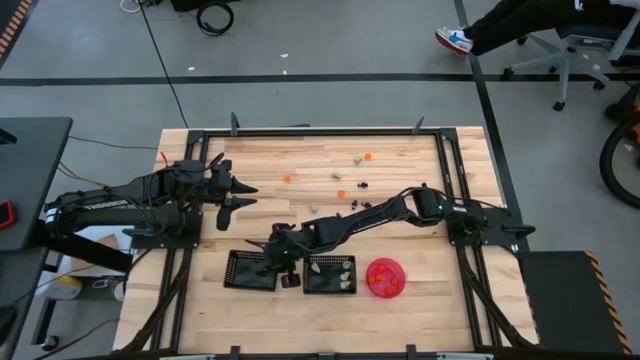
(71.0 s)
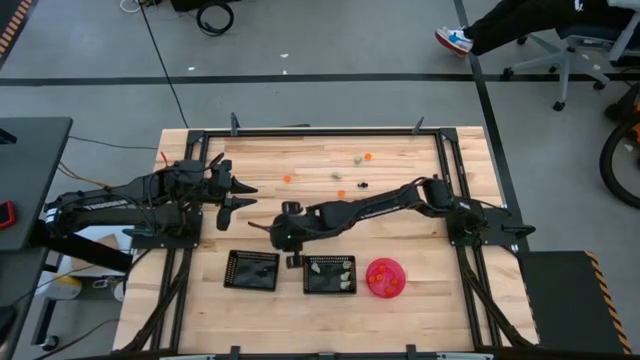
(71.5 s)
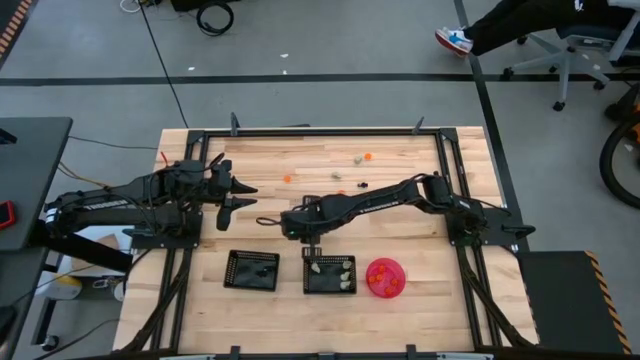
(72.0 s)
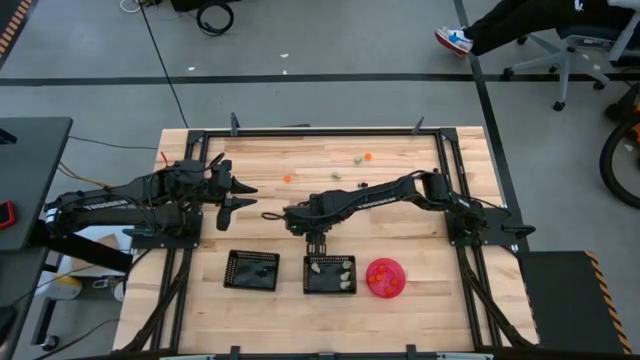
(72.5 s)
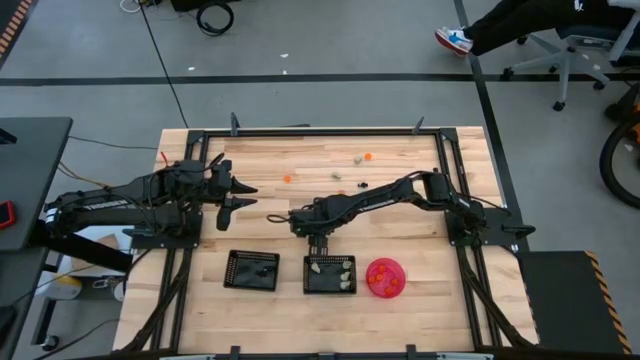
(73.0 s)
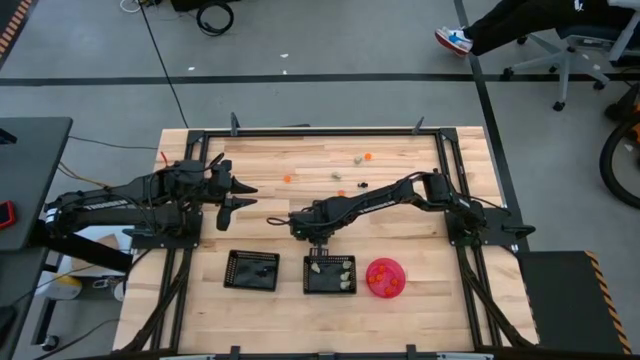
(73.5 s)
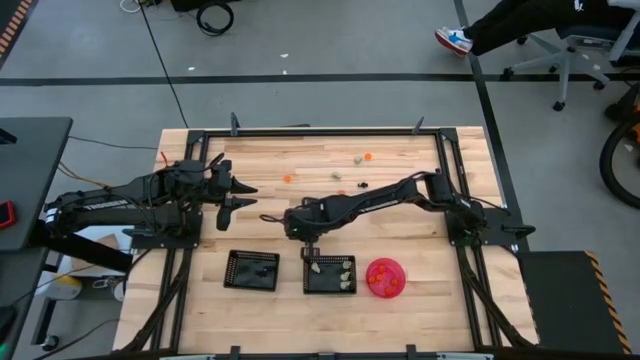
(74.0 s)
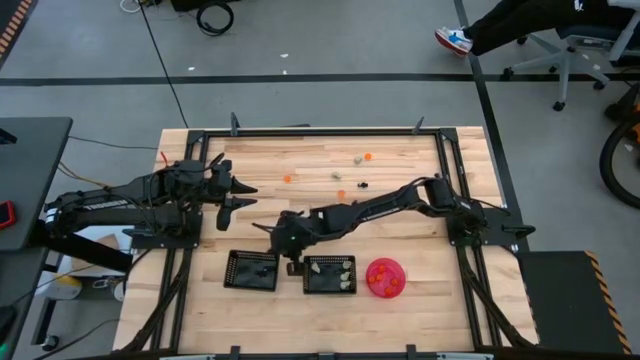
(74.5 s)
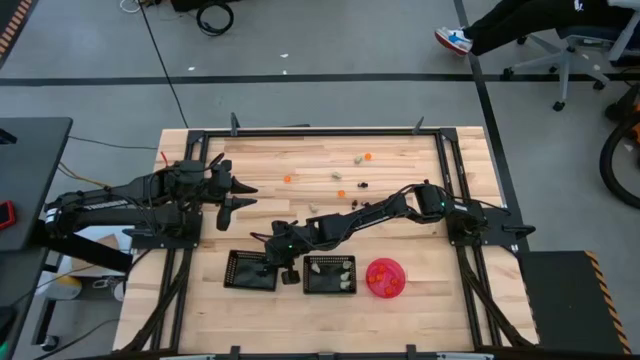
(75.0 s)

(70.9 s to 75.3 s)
Task: Sort Halloween decoration
Put the black skeleton toy into the left black bin

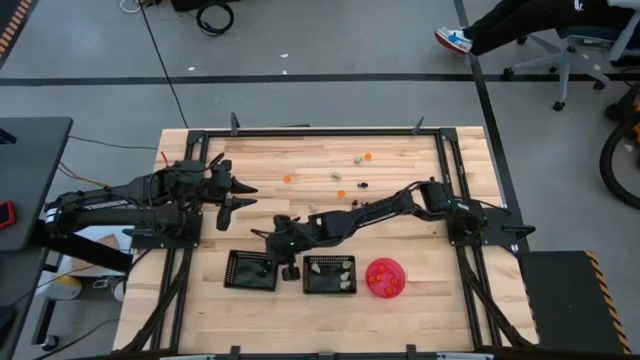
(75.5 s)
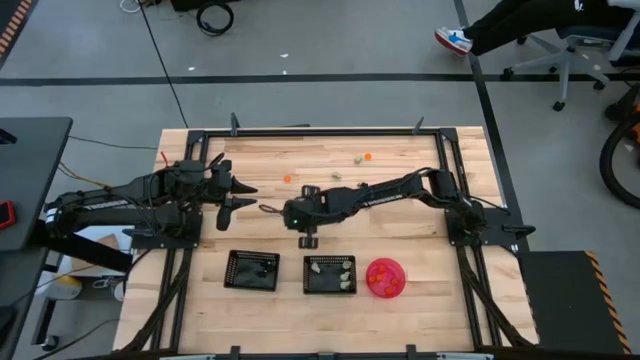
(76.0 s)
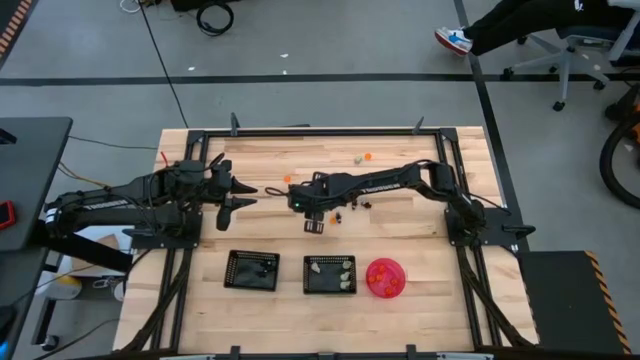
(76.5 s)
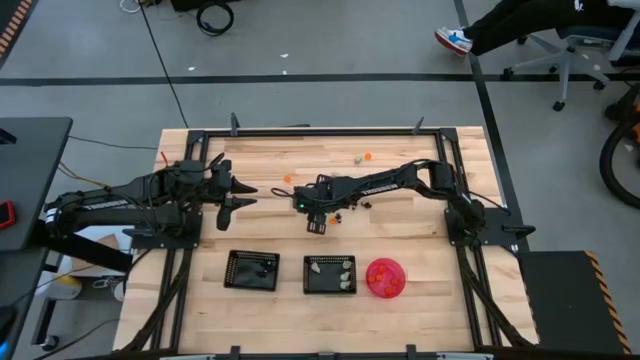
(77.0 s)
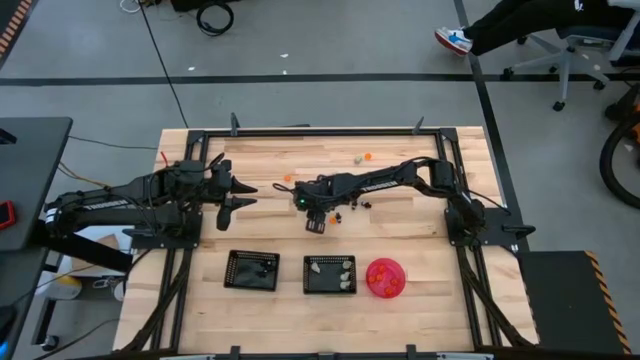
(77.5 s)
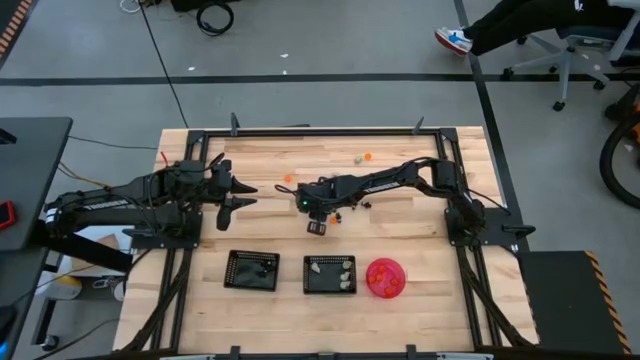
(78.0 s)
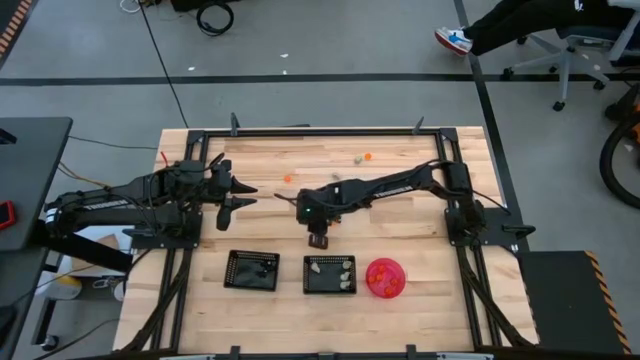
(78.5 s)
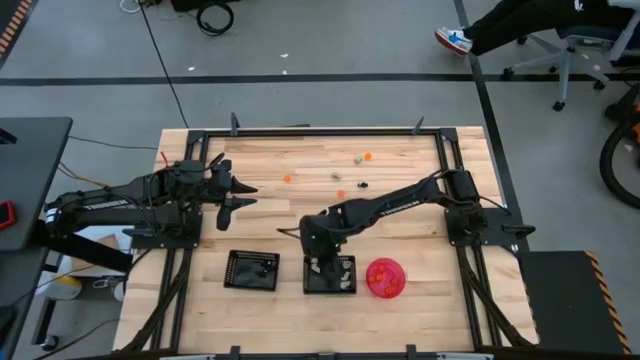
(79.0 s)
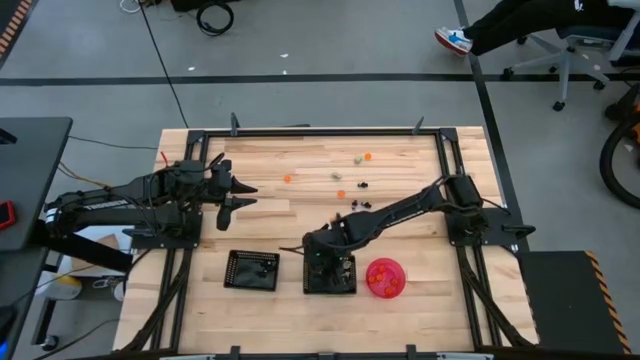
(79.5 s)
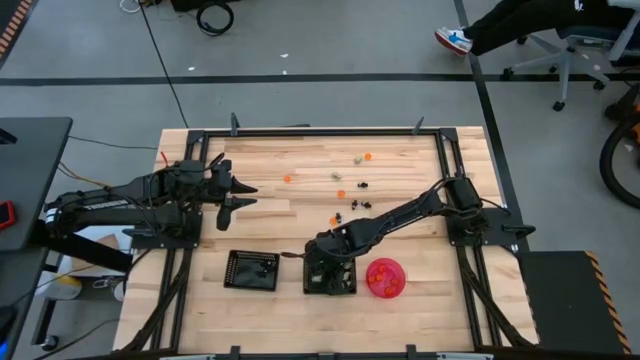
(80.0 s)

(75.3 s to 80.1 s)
Put the white skull toy into the right black bin

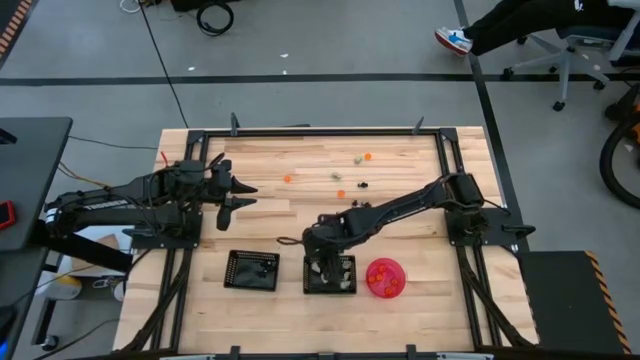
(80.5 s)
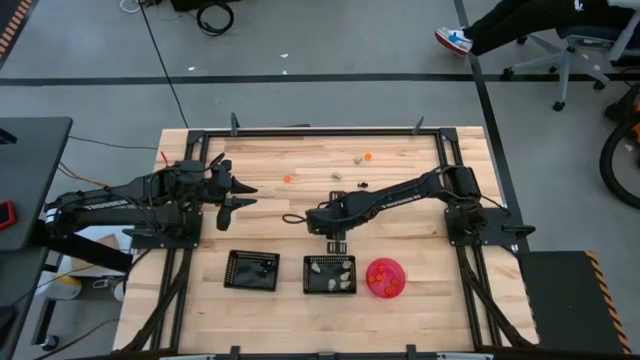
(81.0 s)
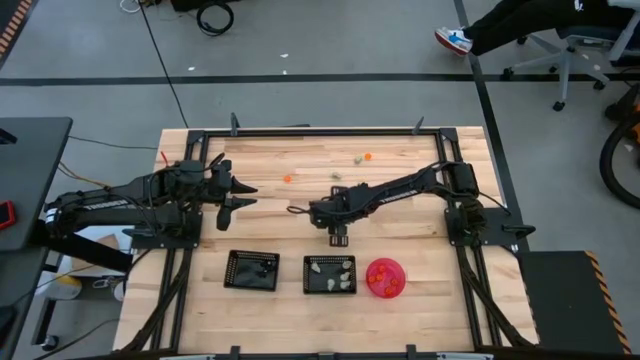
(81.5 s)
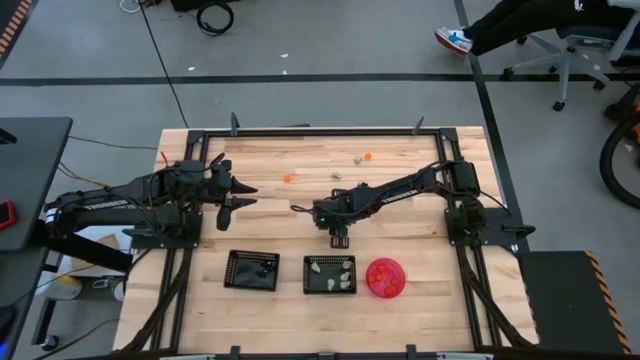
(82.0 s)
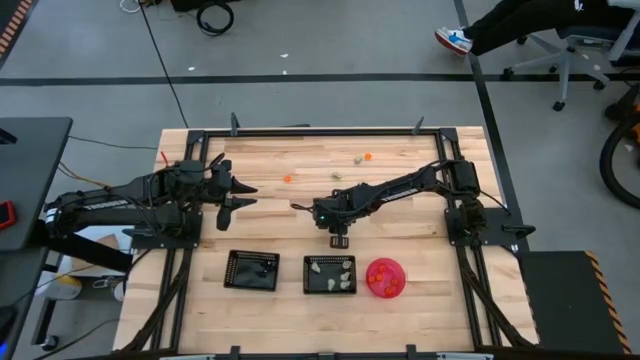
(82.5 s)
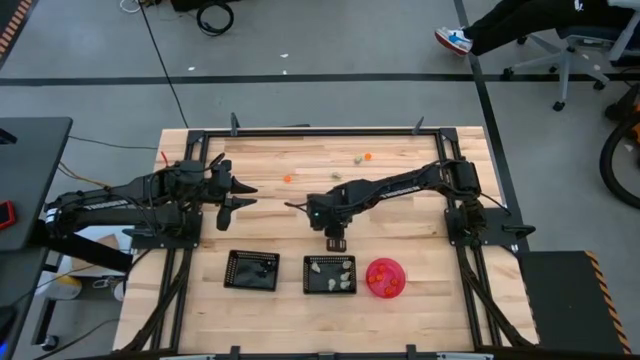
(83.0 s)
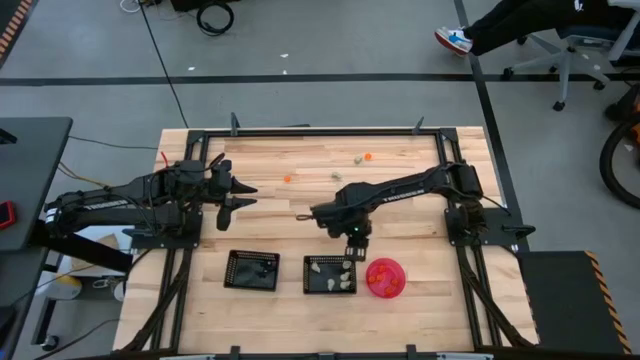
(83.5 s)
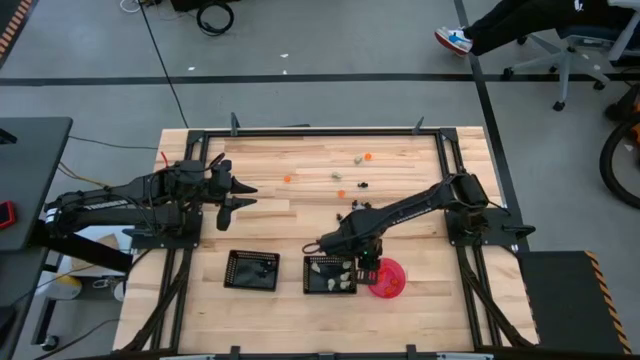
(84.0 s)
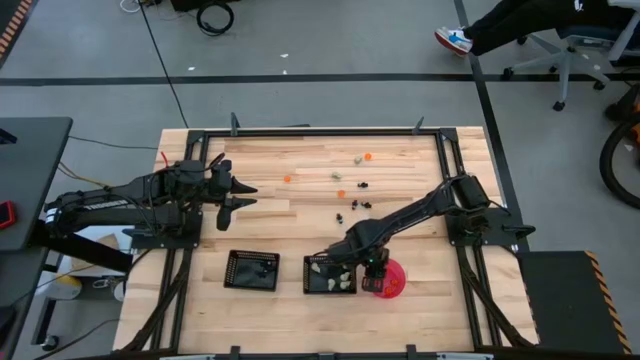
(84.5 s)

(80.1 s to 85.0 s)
Put the orange pumpkin toy into the pink bowl

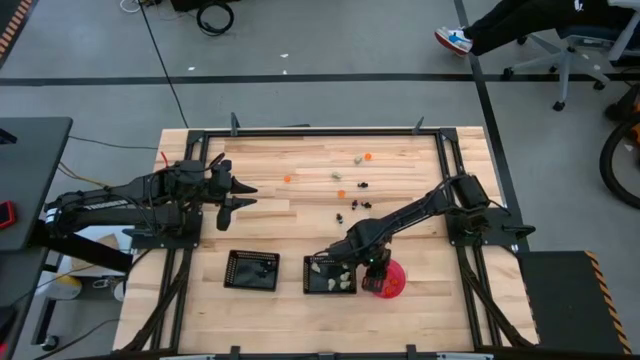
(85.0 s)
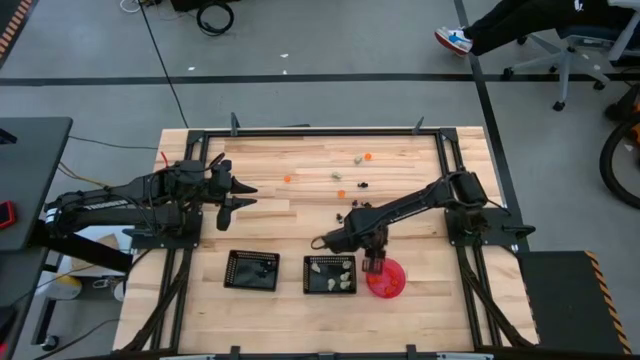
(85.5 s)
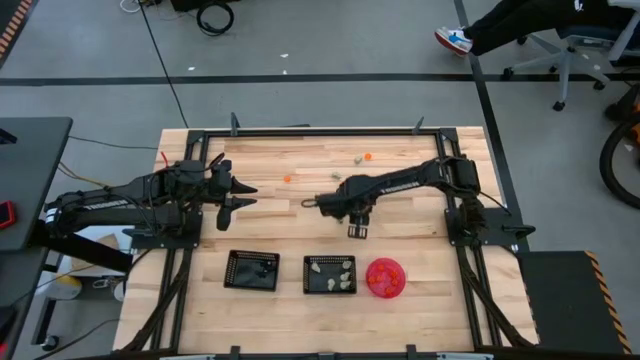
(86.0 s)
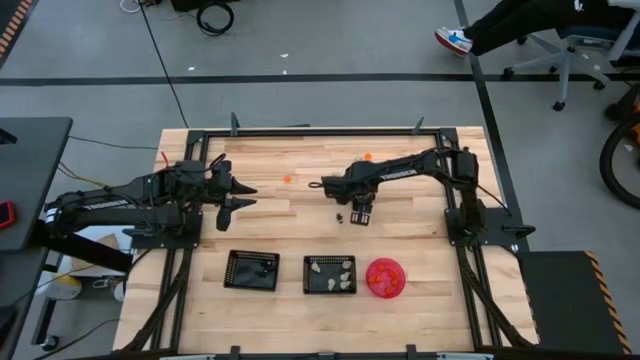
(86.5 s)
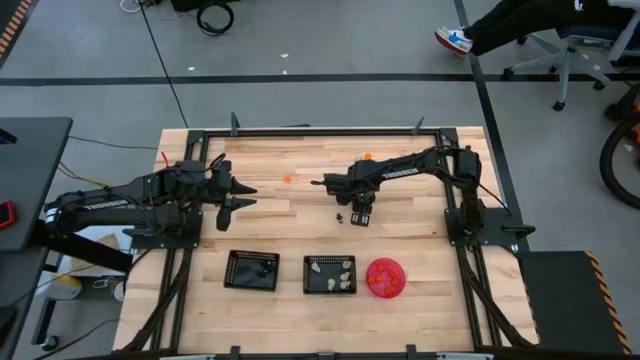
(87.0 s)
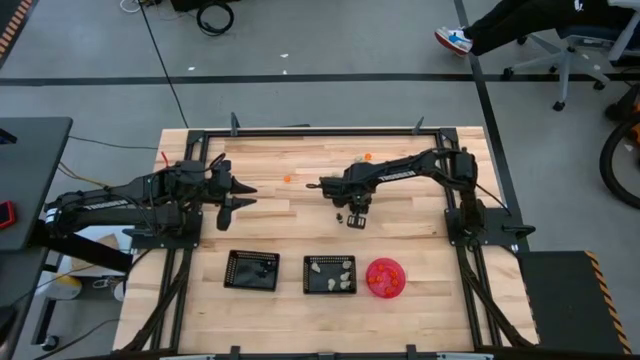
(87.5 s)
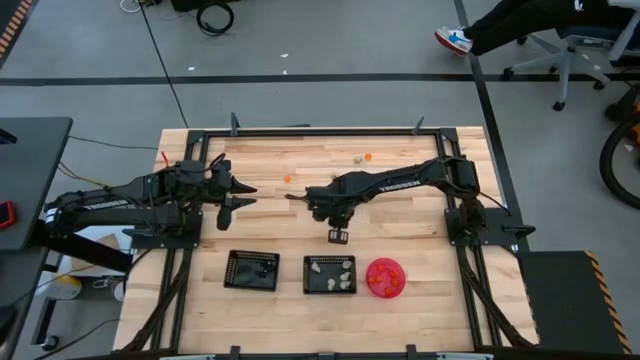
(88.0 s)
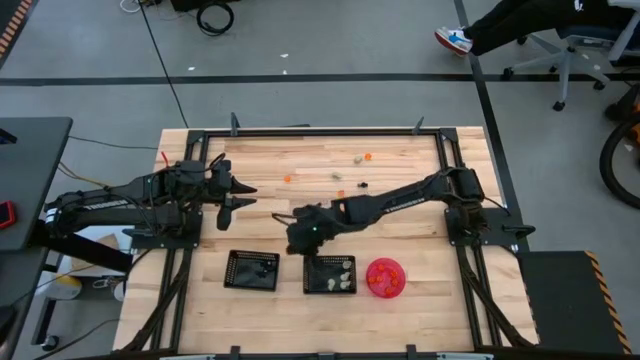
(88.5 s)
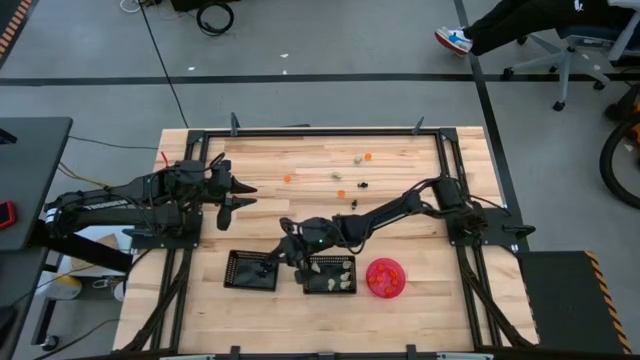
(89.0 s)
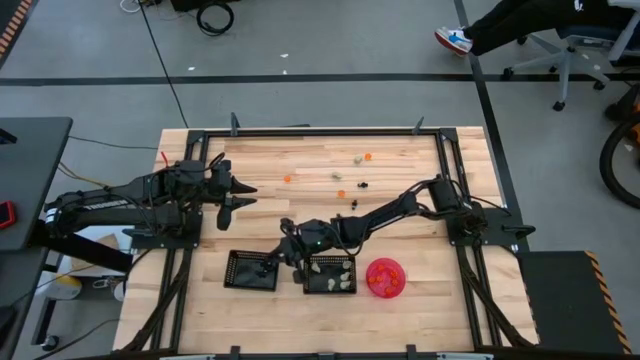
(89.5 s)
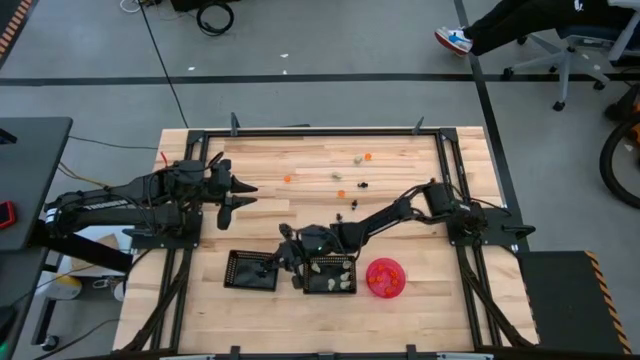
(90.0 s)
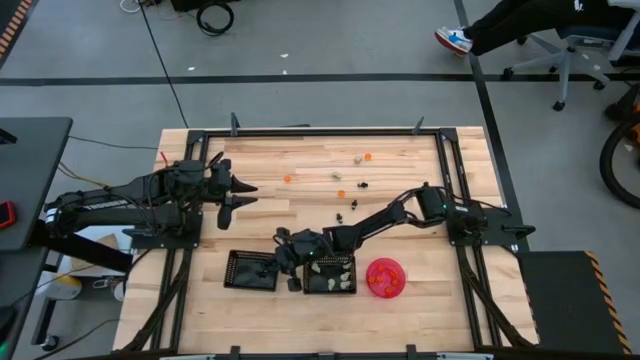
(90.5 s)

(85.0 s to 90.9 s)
Put the black skeleton toy into the left black bin

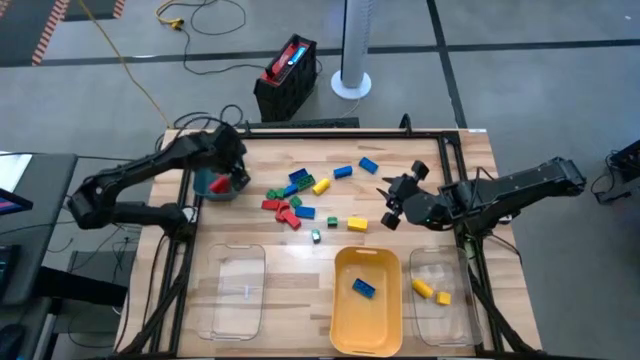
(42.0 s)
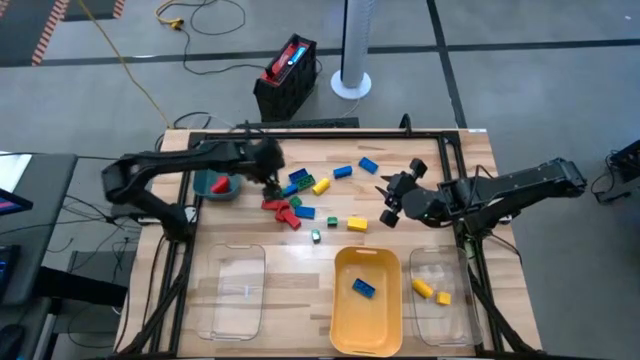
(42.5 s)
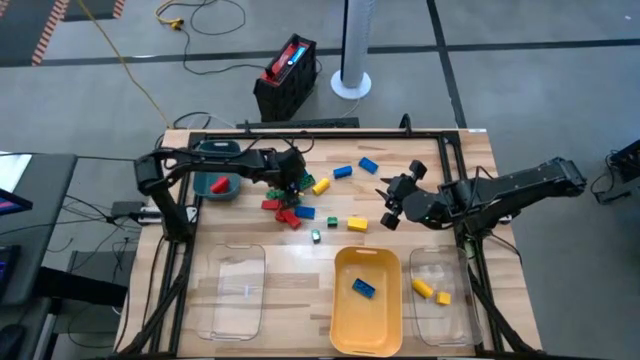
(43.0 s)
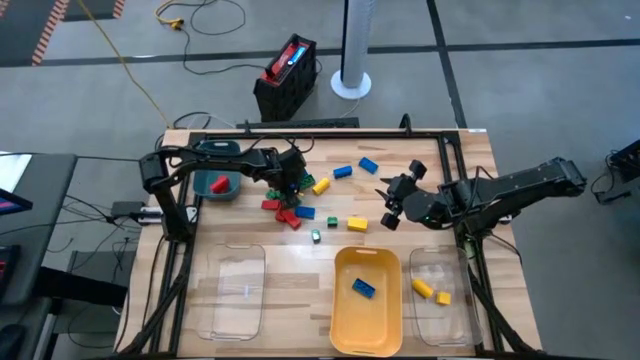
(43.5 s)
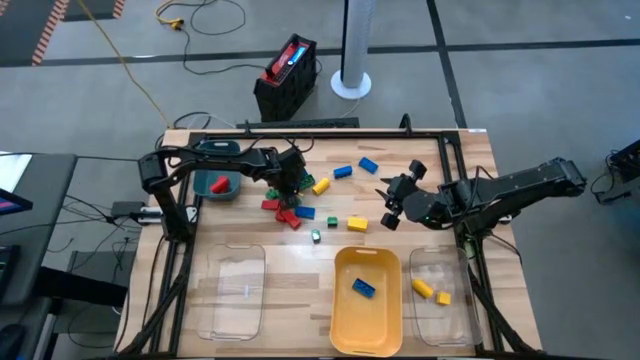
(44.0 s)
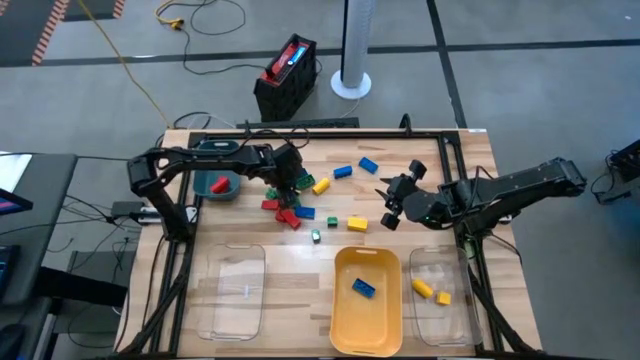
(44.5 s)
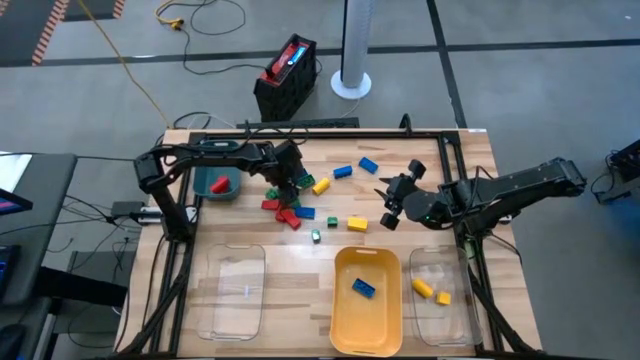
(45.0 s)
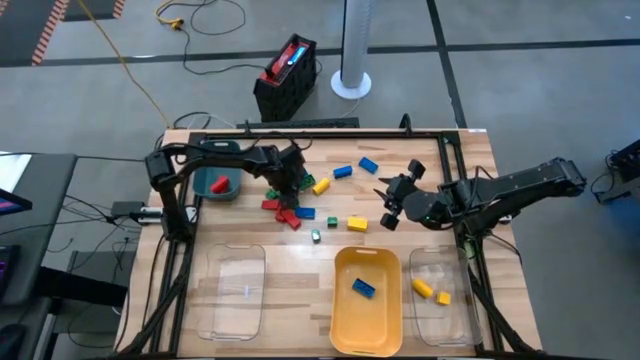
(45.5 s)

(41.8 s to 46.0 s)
Task: Sort blocks
Put the blue game piece into the yellow bin
